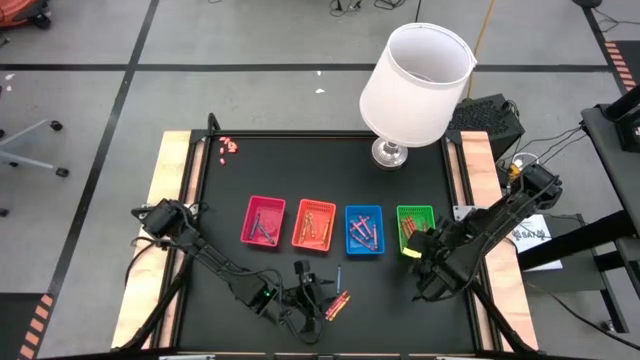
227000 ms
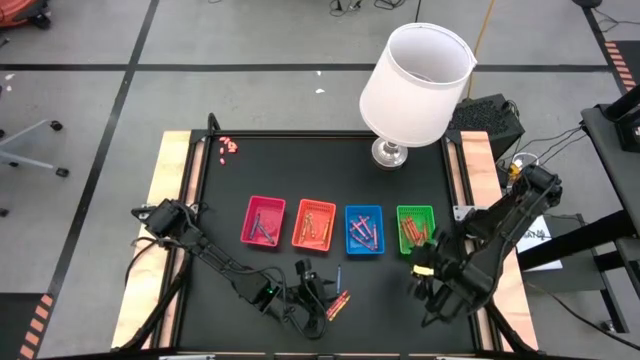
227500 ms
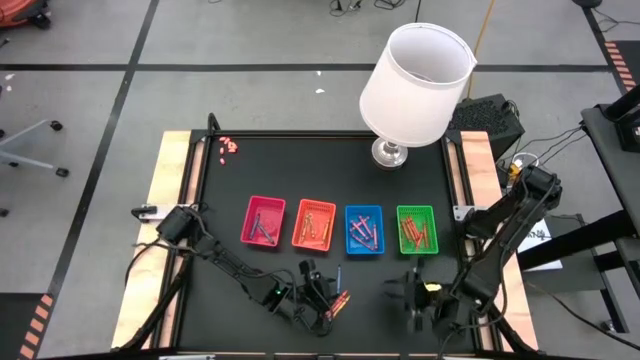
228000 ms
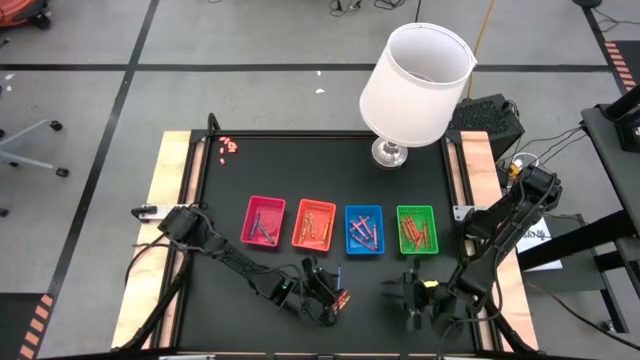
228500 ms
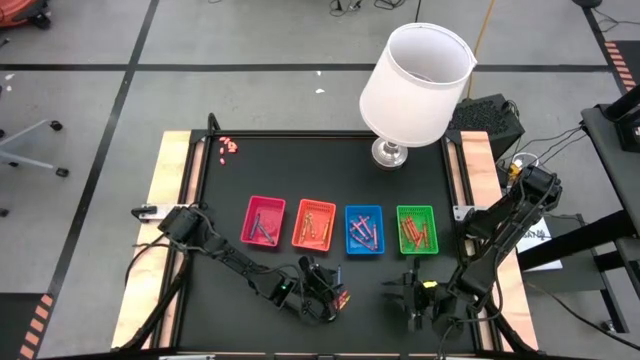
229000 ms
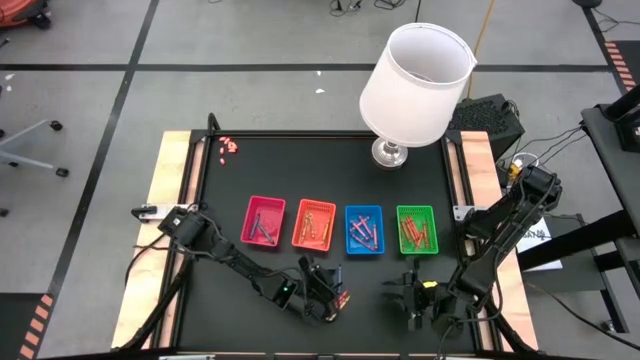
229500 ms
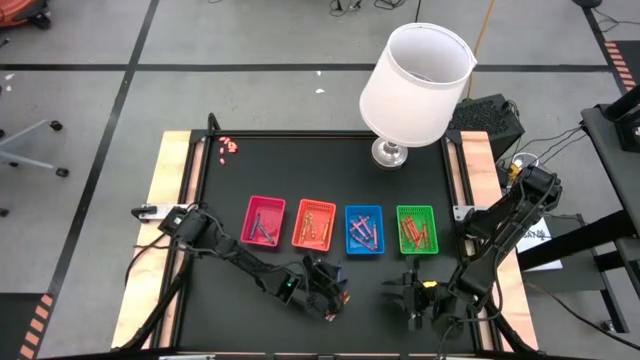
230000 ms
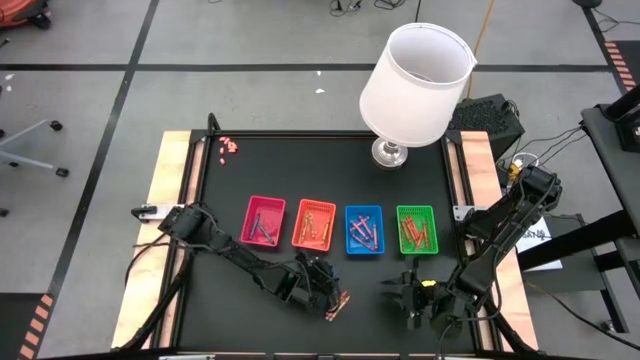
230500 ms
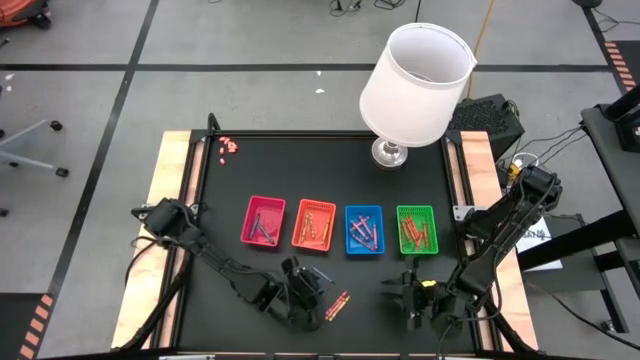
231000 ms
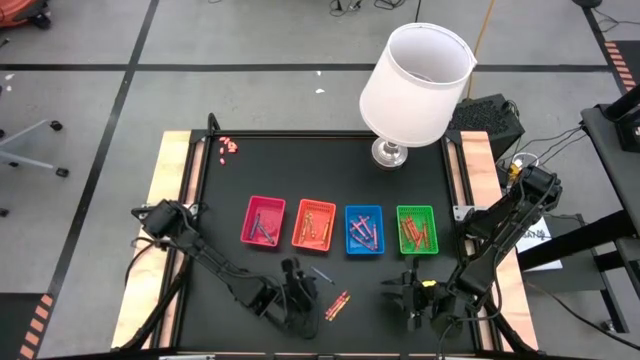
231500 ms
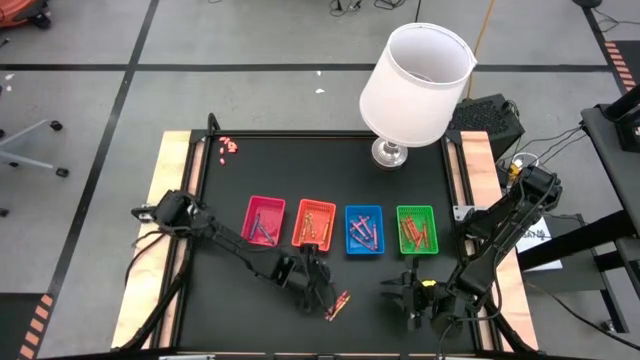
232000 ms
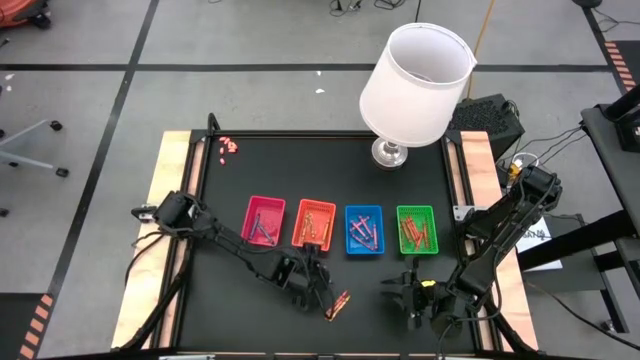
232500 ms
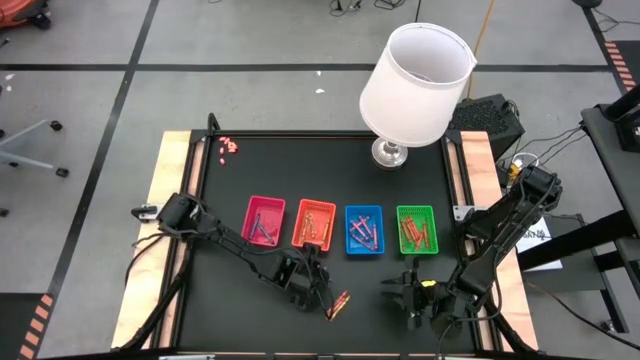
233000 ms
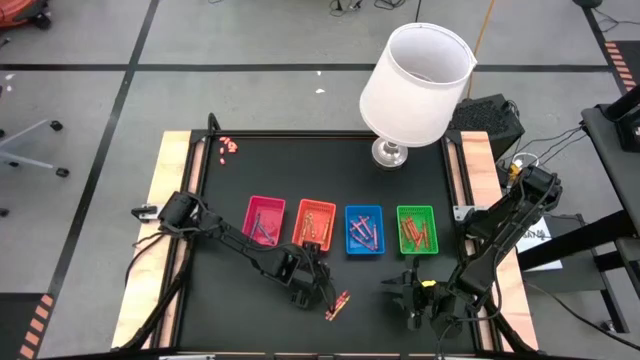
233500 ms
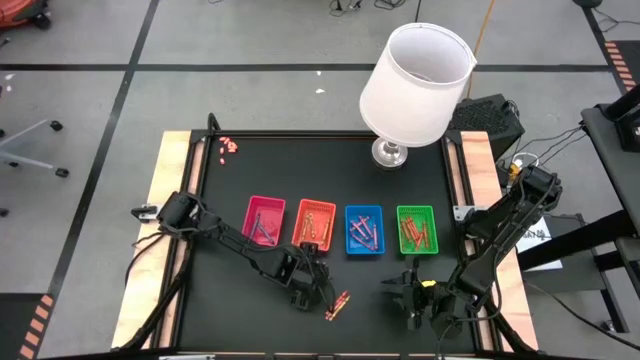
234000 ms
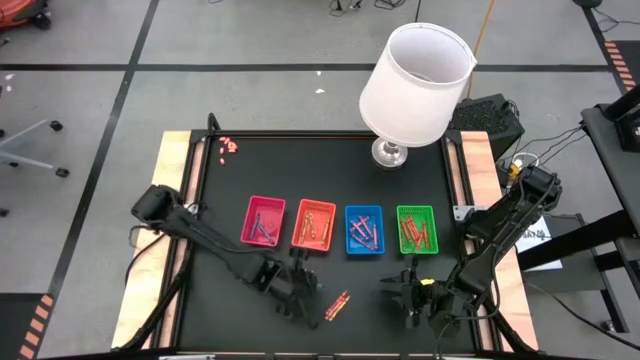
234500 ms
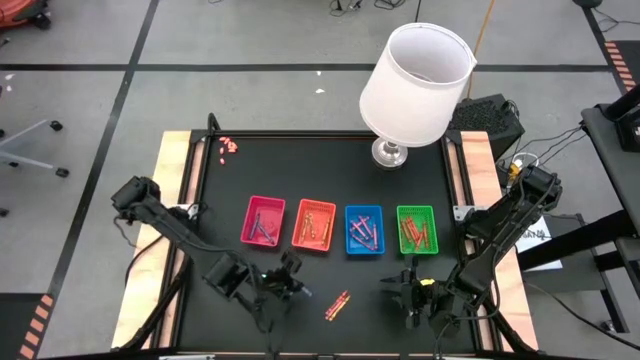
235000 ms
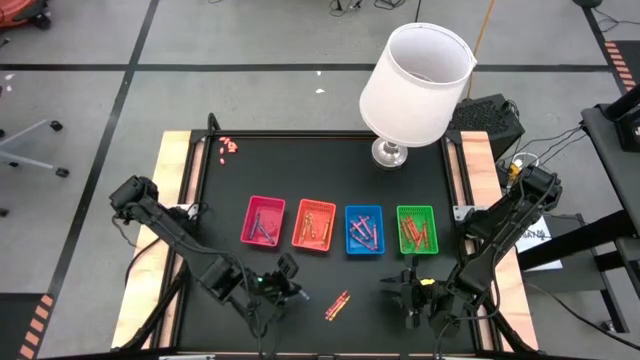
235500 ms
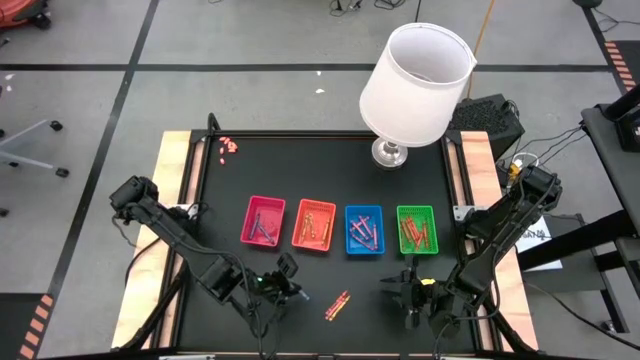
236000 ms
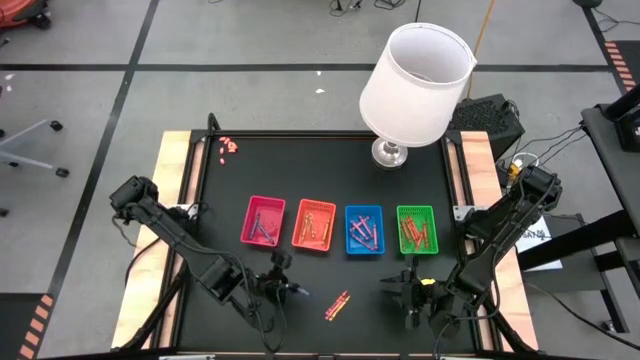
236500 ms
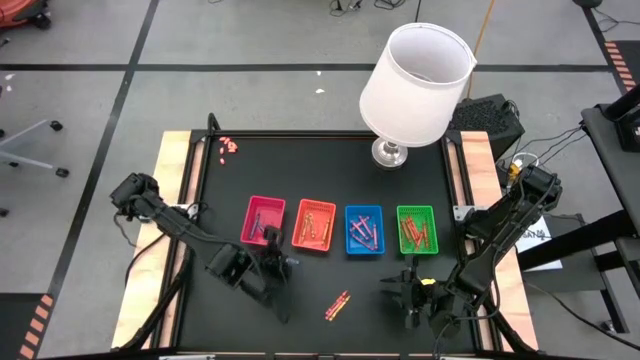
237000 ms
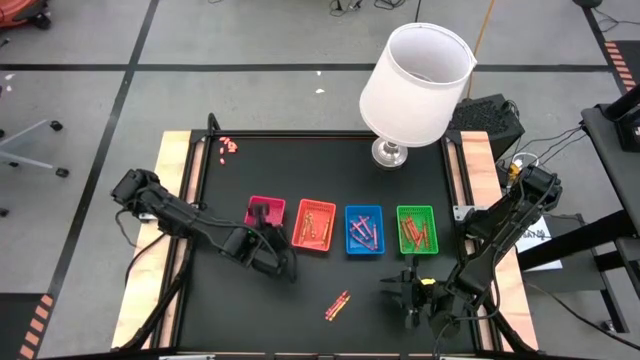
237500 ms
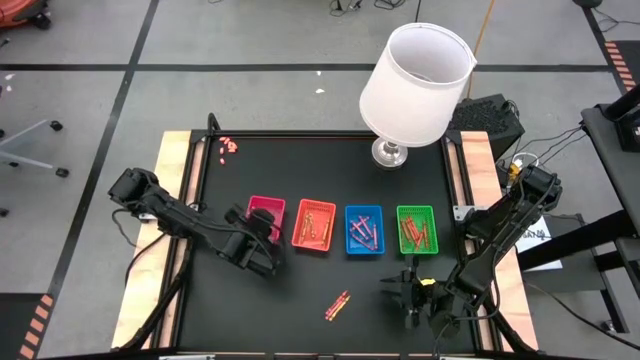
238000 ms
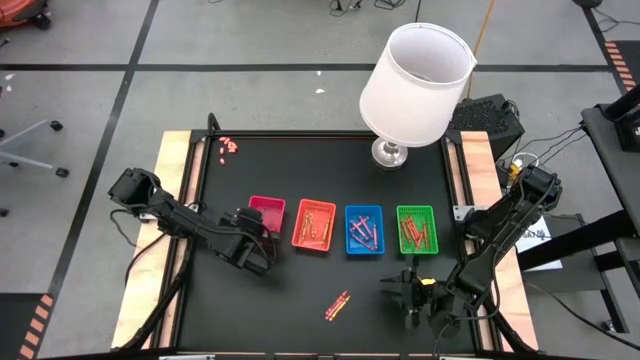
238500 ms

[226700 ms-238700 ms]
Task: Sort crayons
Put the blue crayon into the red bin

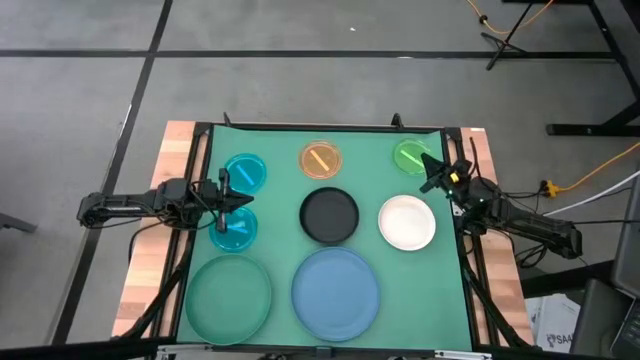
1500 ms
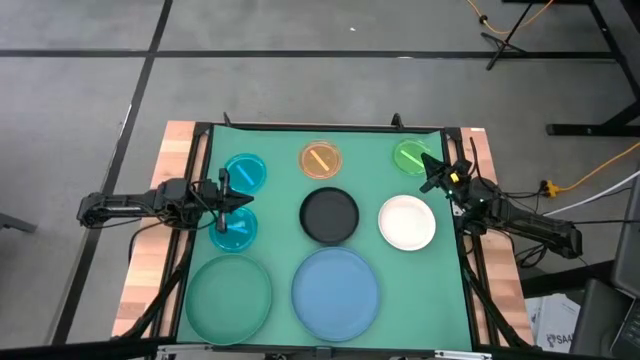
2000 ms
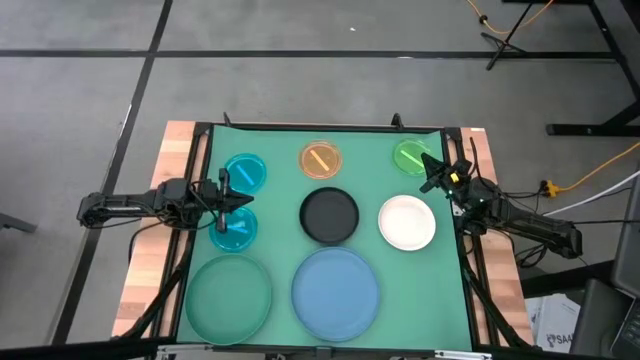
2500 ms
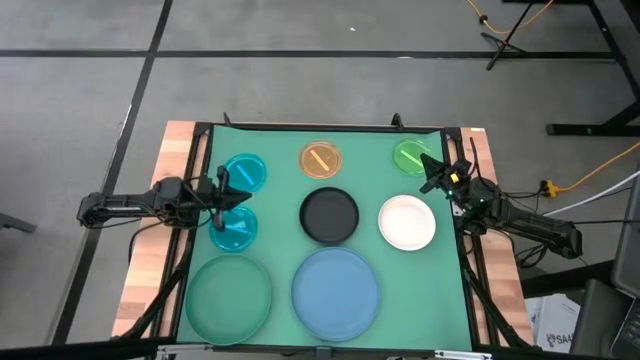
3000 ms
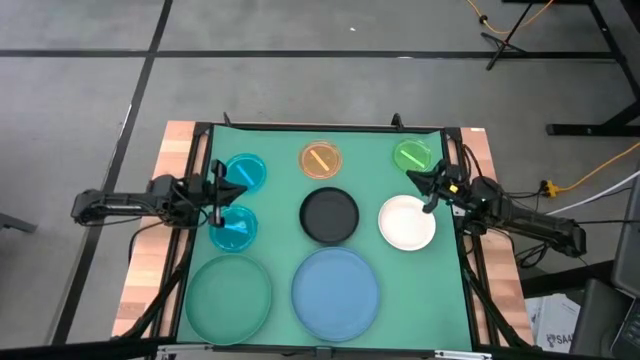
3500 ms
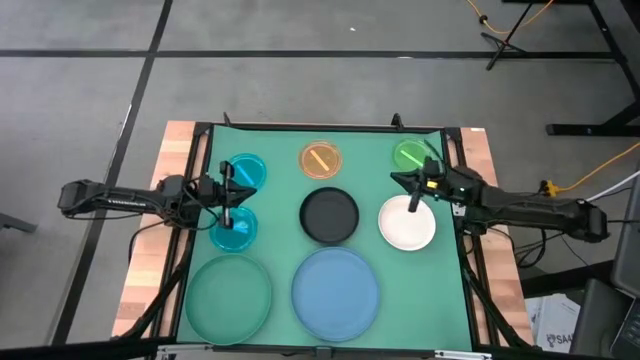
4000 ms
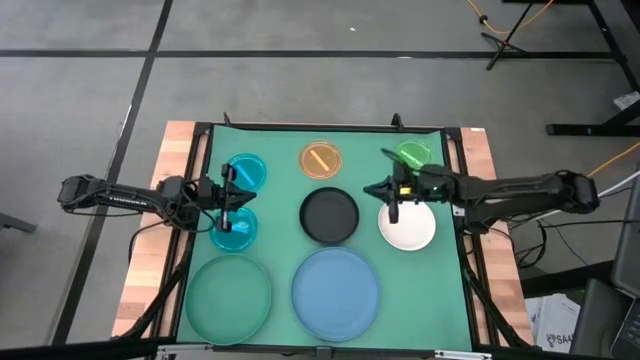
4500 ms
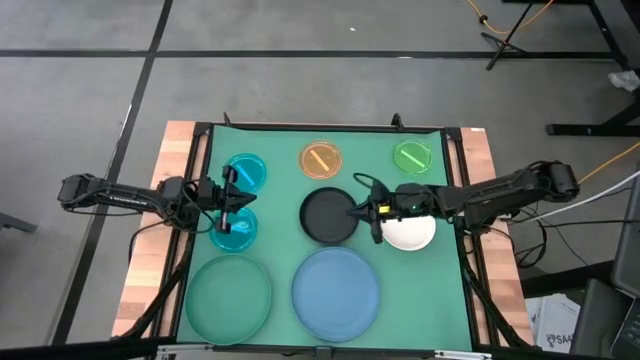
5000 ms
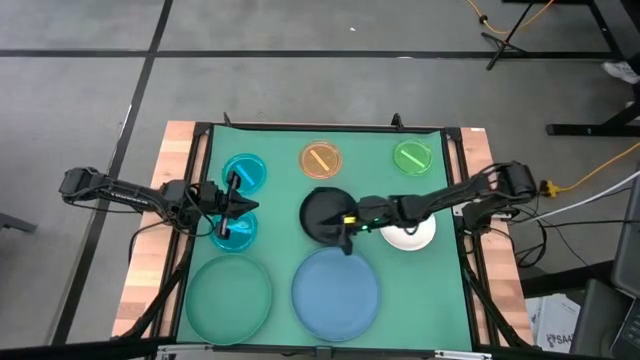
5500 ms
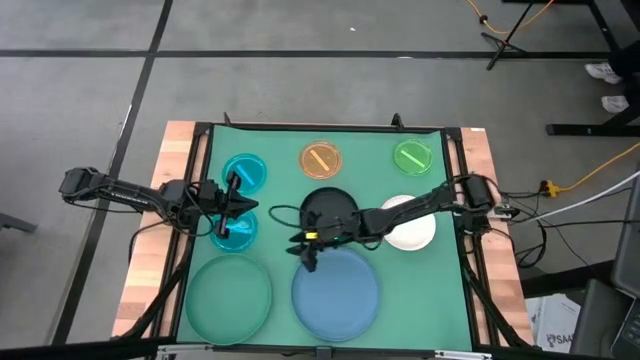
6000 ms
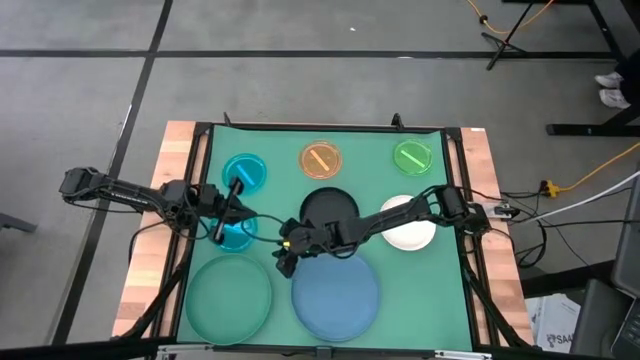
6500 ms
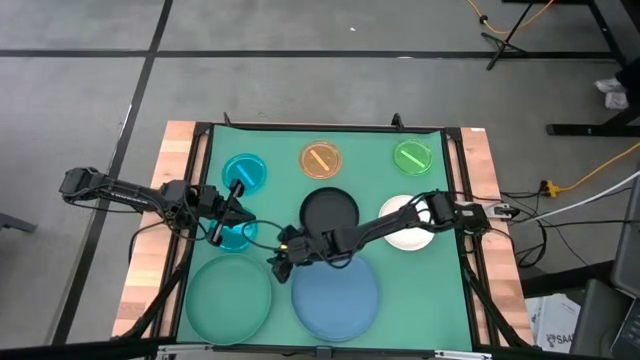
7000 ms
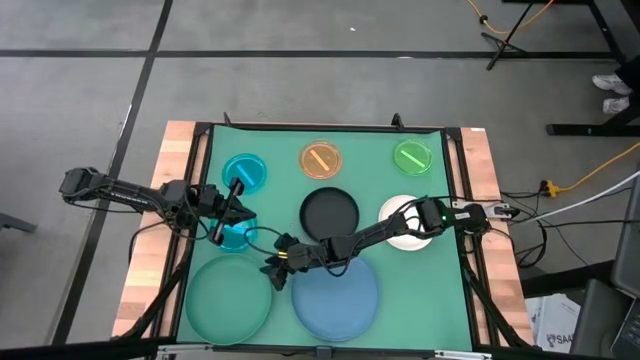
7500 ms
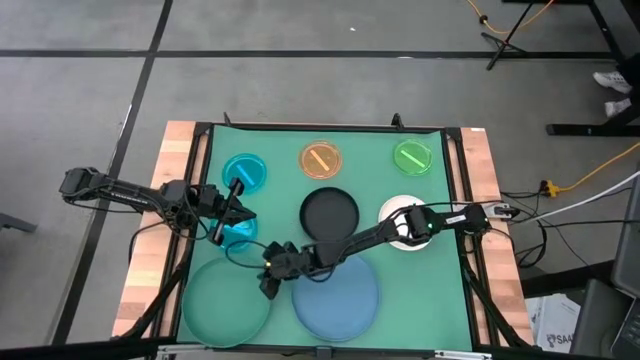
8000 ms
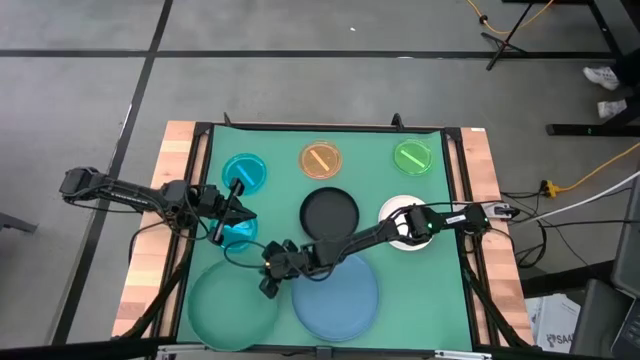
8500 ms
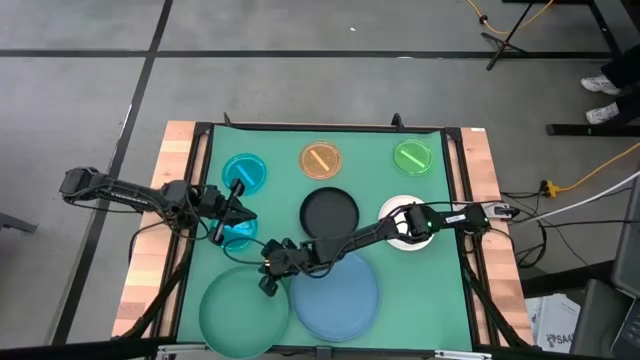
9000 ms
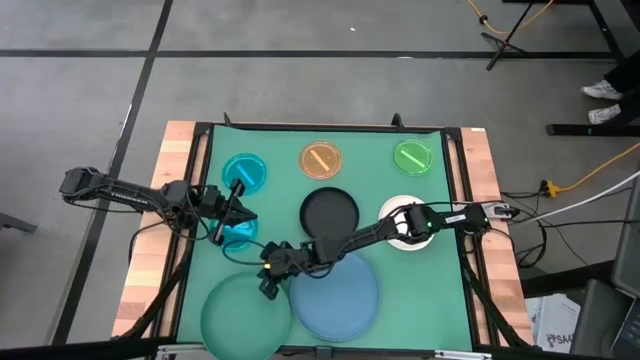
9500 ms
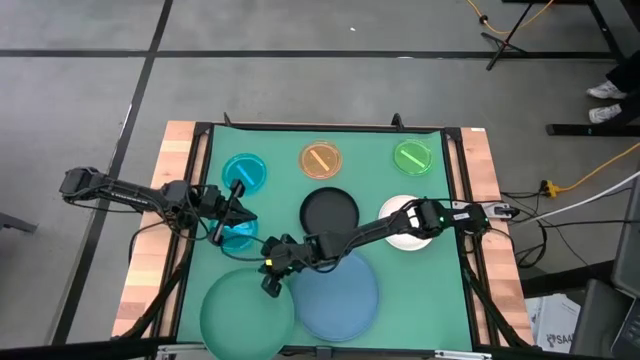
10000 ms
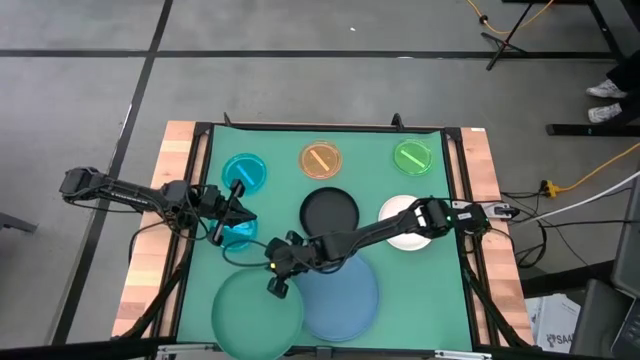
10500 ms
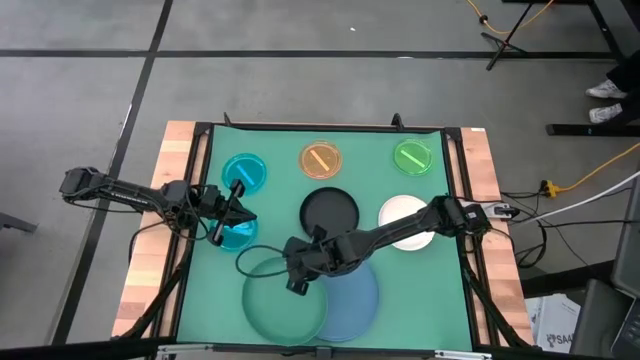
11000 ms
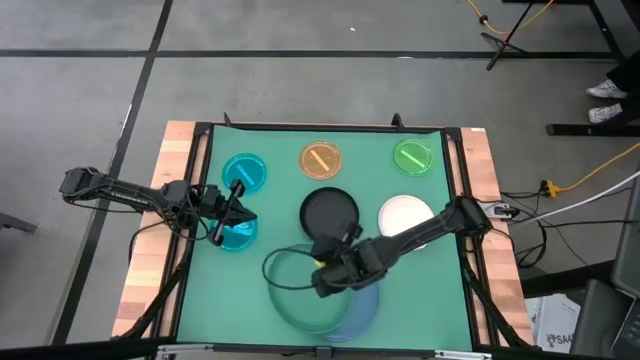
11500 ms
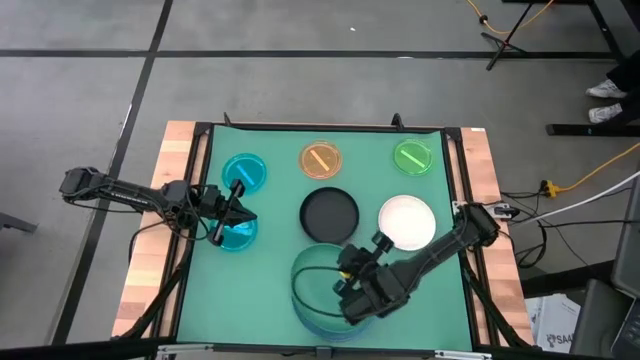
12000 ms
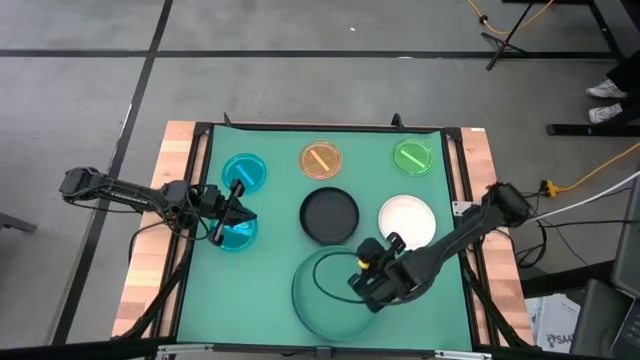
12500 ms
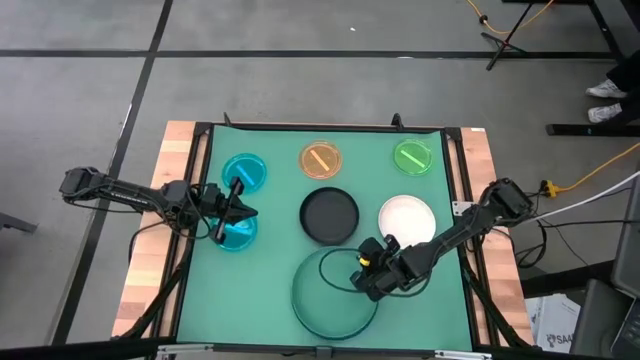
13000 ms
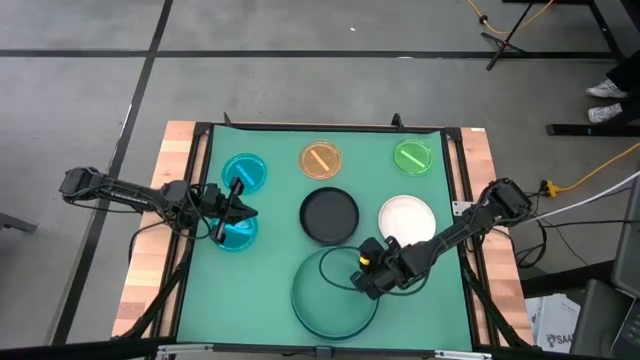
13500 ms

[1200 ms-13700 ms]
Task: Stack plastic plates
Stack the green plate on top of the blue plate
